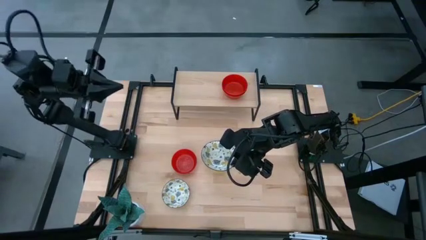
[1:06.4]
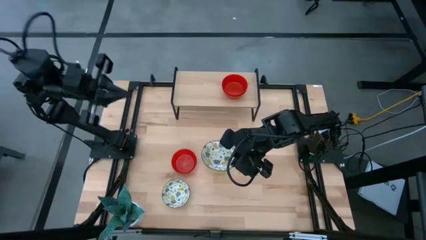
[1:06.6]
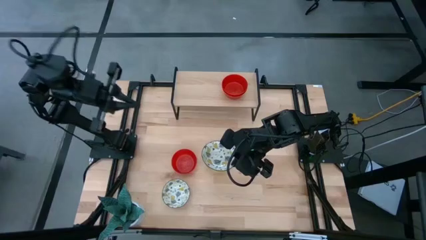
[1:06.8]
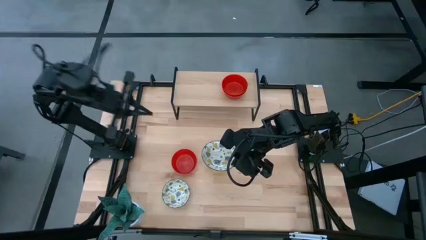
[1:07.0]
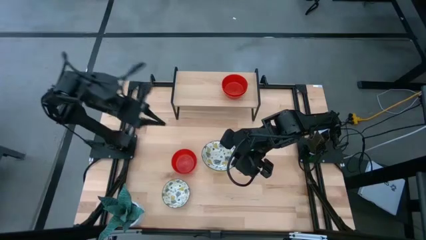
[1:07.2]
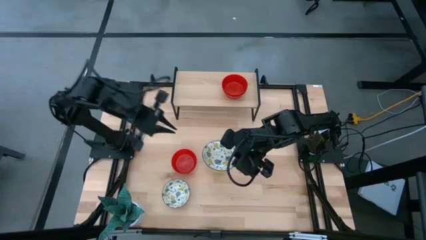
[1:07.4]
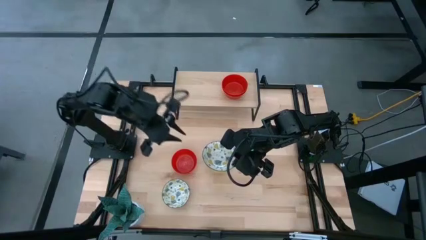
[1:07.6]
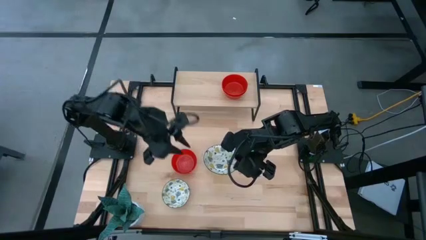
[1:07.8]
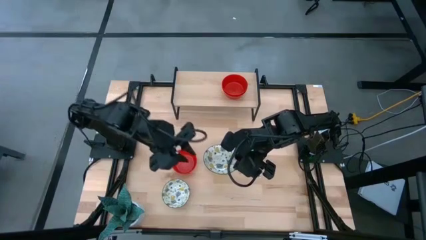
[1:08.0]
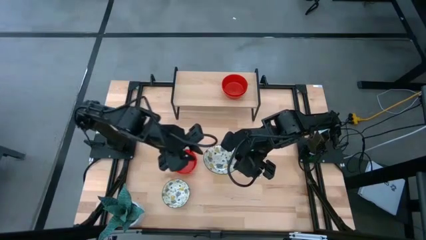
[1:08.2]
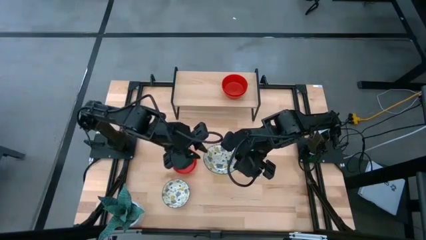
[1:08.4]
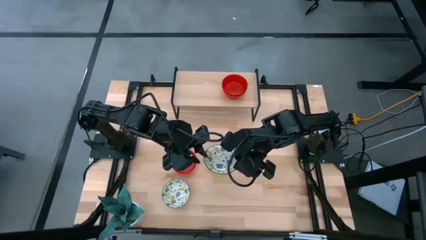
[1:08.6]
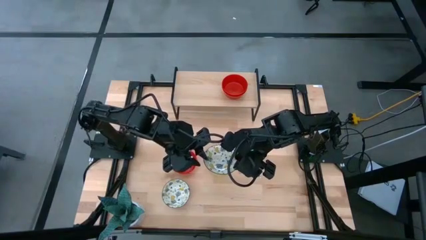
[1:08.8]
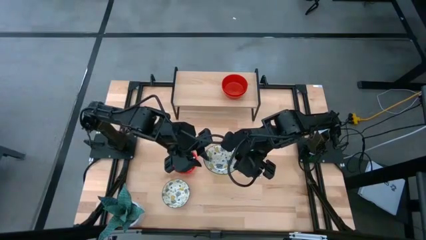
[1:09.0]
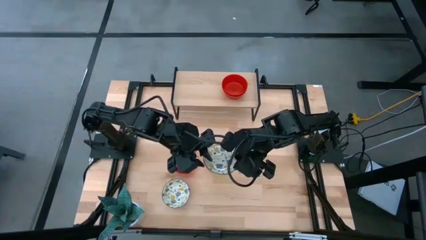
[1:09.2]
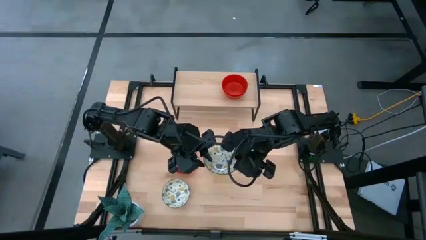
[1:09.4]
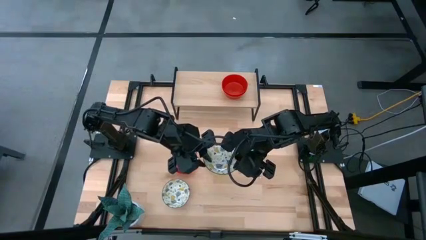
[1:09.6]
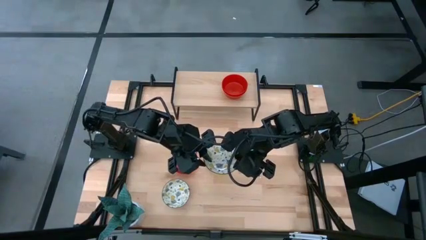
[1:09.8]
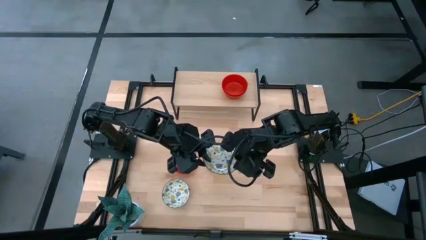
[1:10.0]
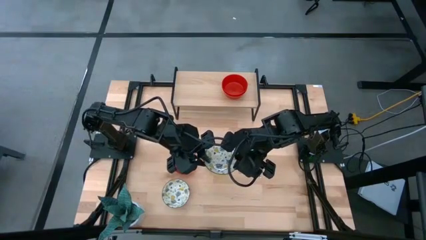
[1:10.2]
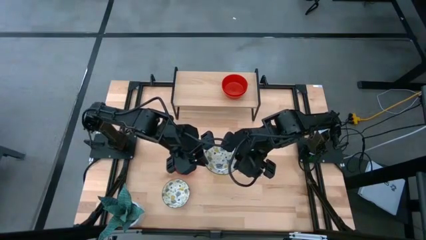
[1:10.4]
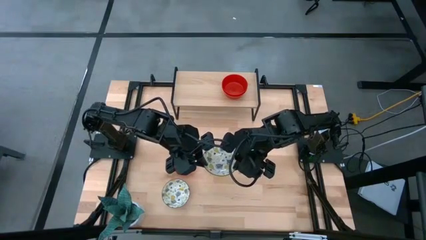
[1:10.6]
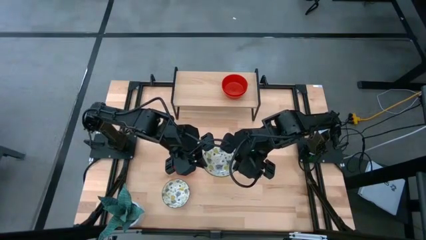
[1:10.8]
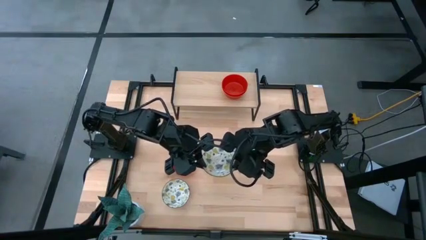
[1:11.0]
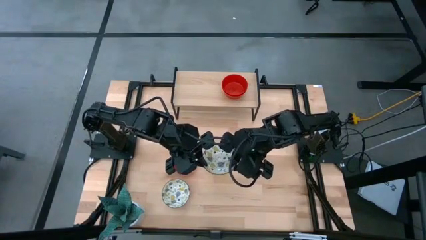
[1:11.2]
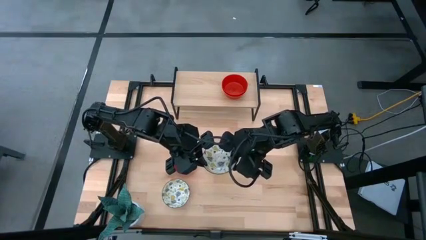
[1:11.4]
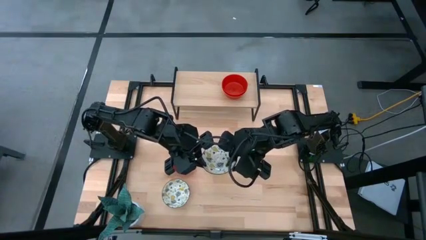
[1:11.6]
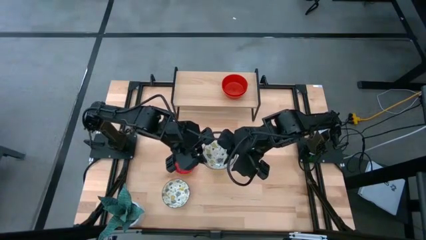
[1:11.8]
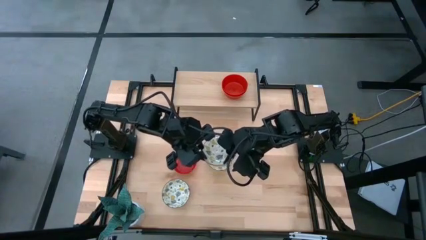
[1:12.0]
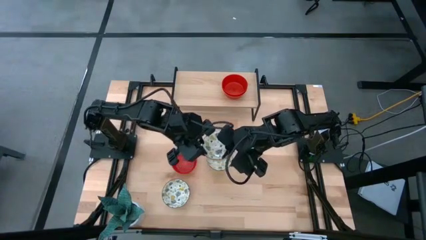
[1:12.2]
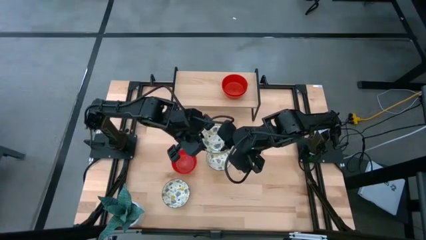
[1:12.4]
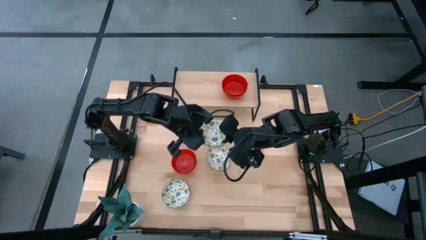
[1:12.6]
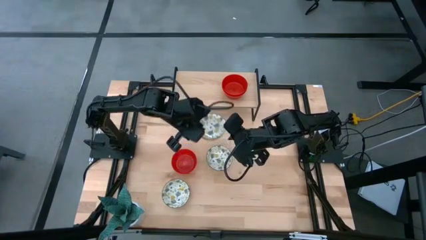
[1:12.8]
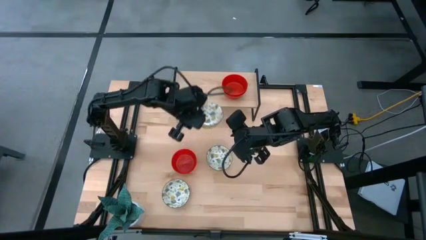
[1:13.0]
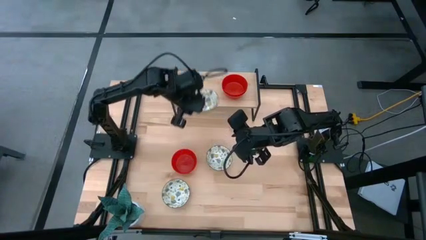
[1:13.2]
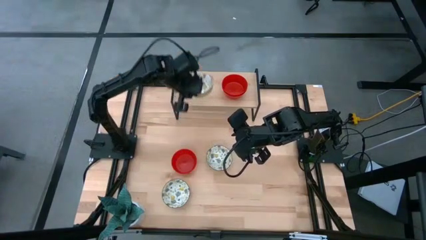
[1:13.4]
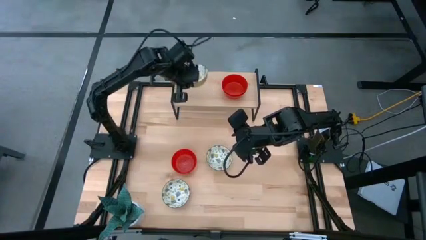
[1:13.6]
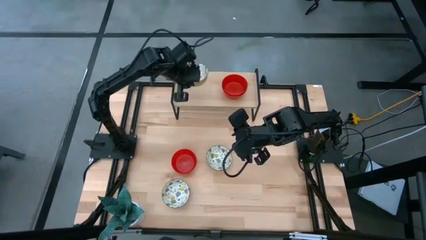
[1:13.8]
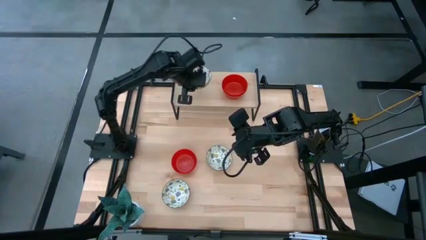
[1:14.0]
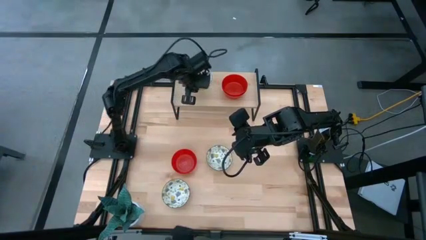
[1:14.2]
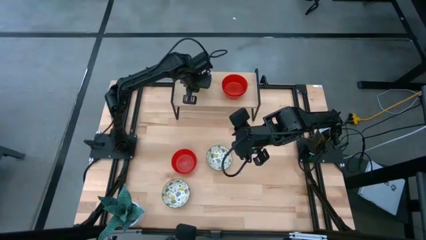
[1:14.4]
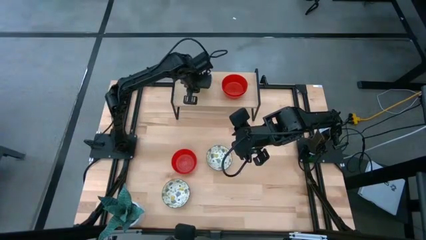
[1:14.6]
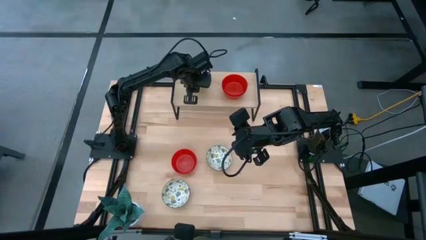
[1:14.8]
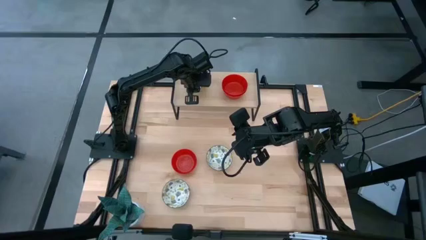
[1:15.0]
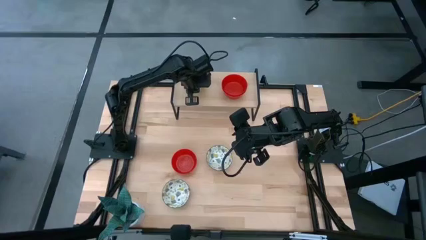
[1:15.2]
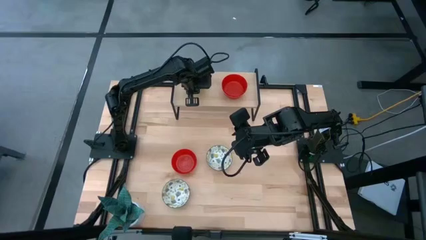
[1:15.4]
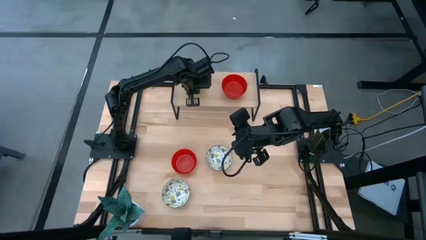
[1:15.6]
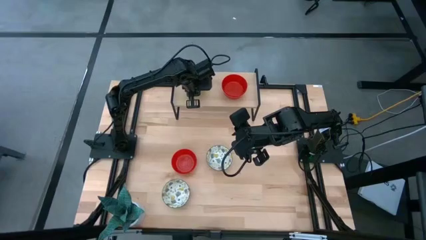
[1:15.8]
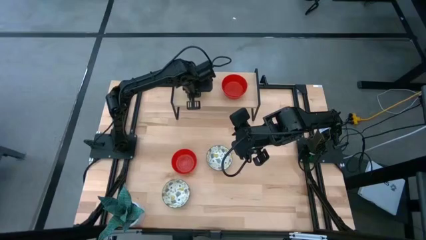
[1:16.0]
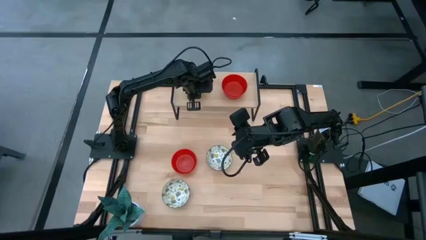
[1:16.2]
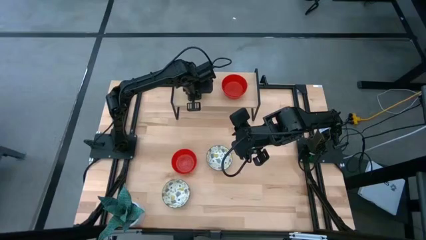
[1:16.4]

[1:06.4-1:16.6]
Task: Pick & Place Mini bowls
Put the right white patterned bowl on the shelf
